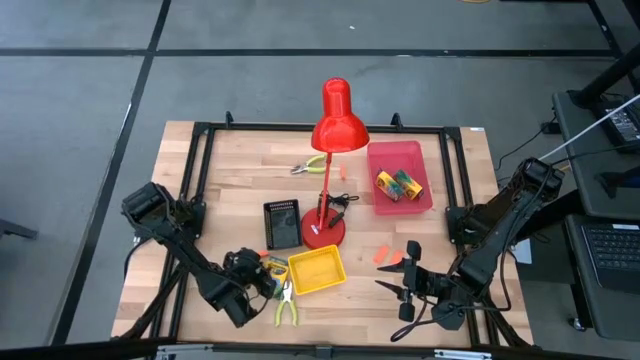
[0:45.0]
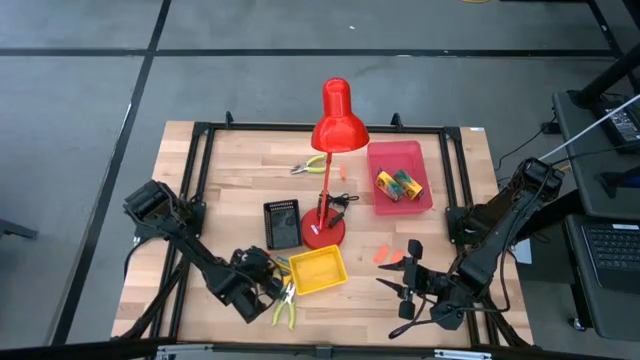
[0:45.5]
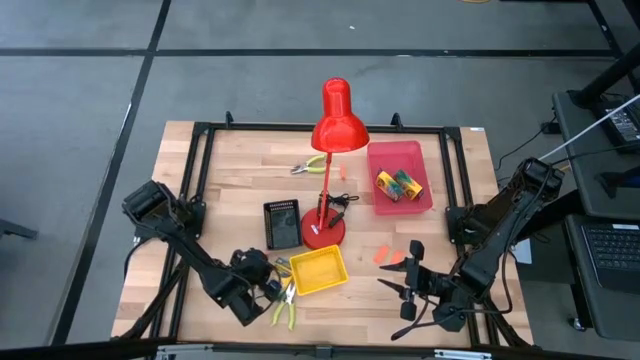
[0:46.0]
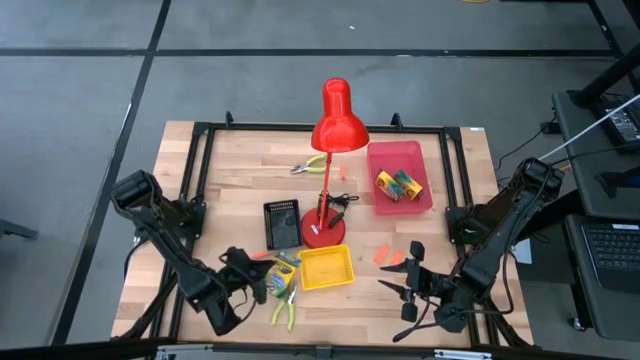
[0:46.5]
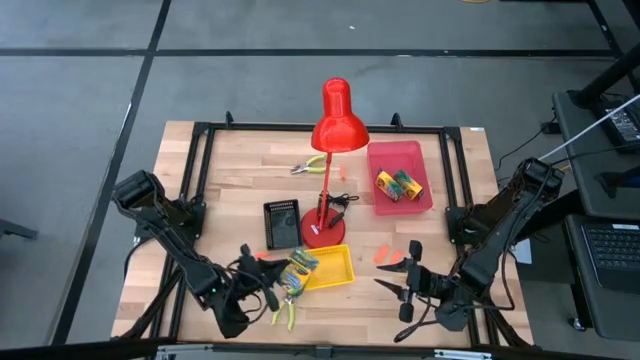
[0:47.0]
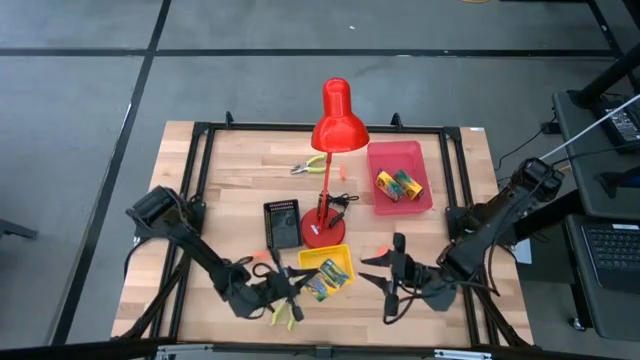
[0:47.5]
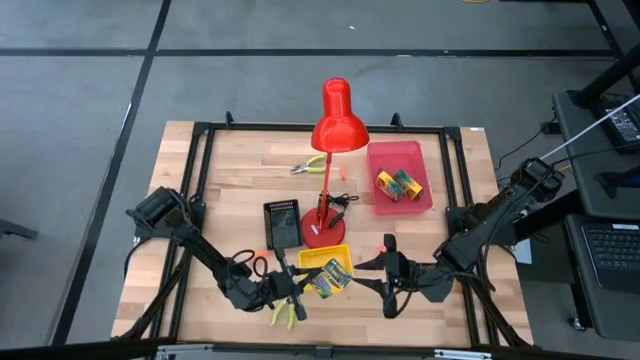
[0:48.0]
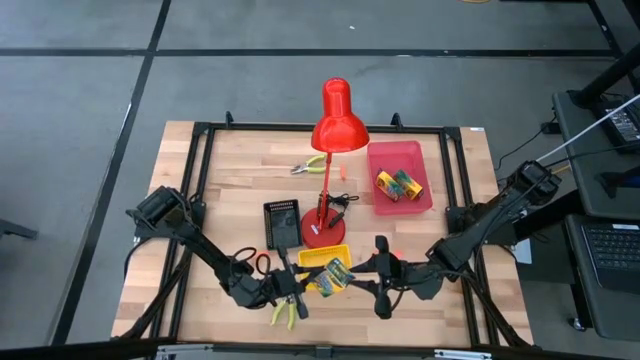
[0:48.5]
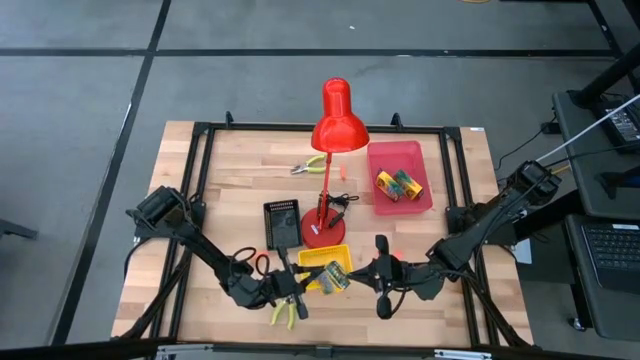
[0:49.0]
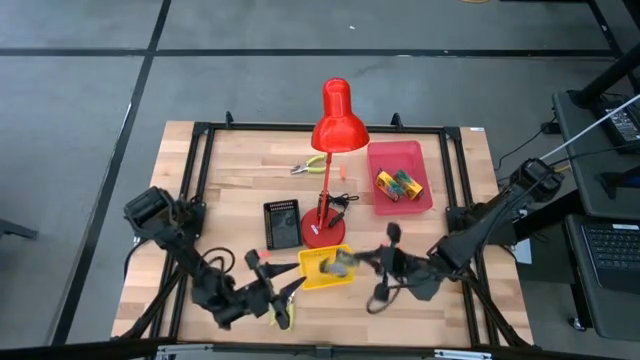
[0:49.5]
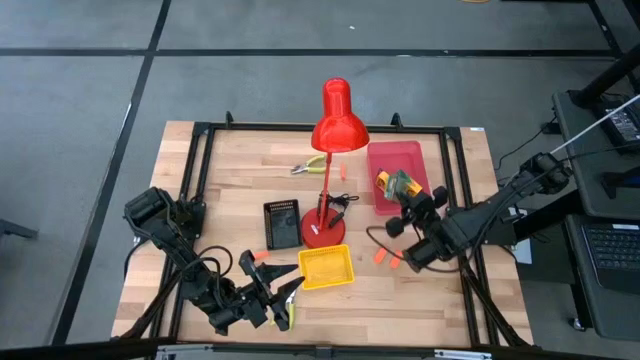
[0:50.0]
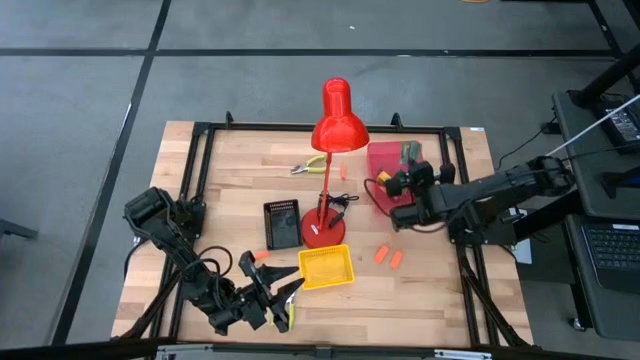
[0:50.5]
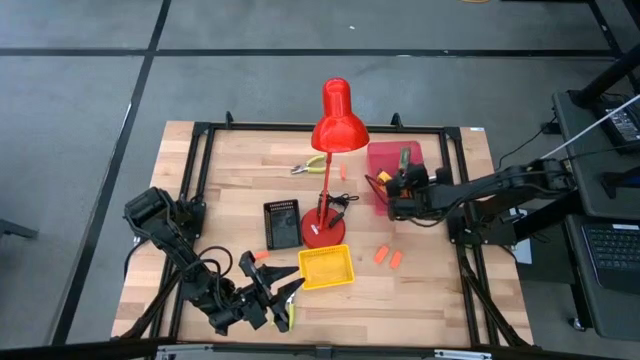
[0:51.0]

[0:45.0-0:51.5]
Task: Pick & Place School Supplies
Put the crayon box into the pink bin

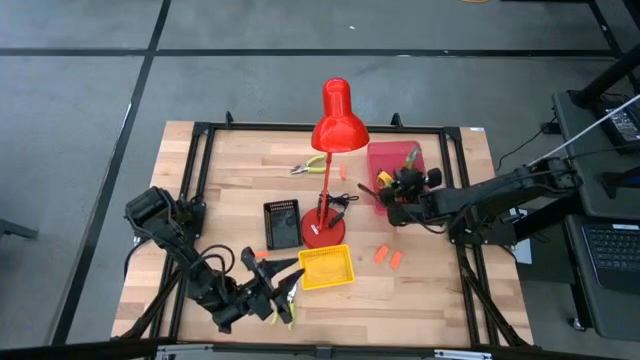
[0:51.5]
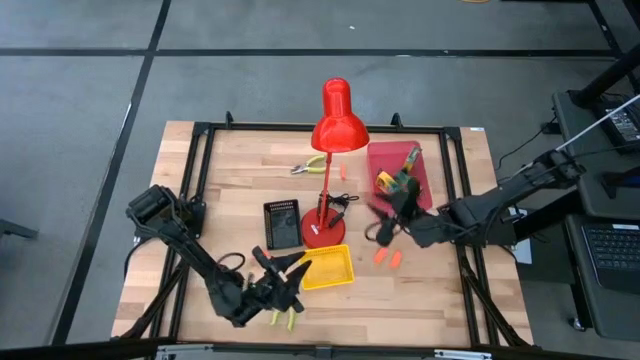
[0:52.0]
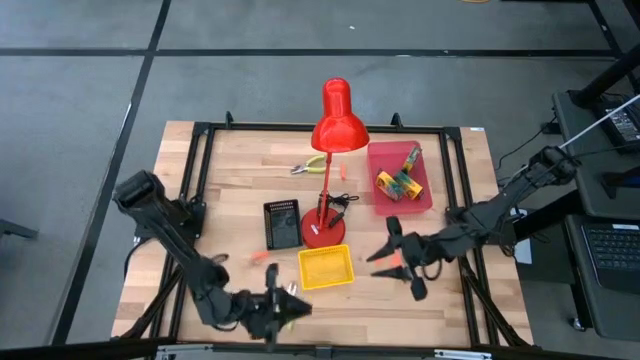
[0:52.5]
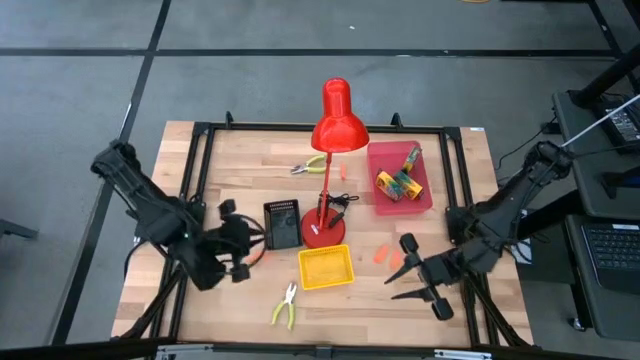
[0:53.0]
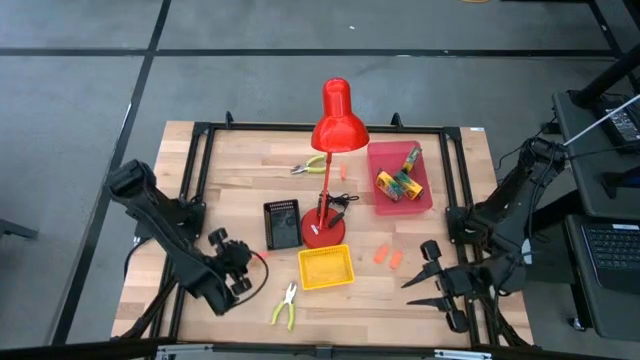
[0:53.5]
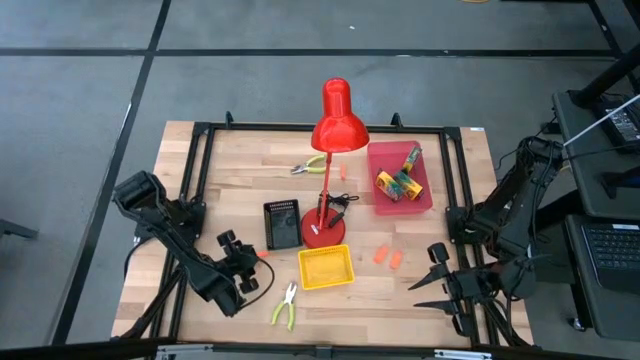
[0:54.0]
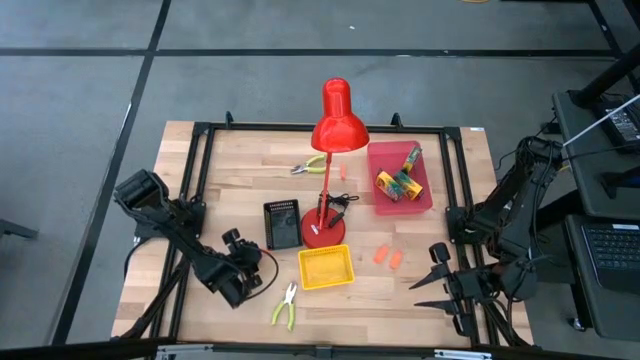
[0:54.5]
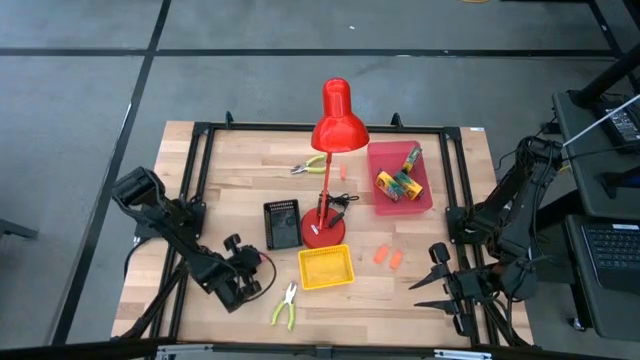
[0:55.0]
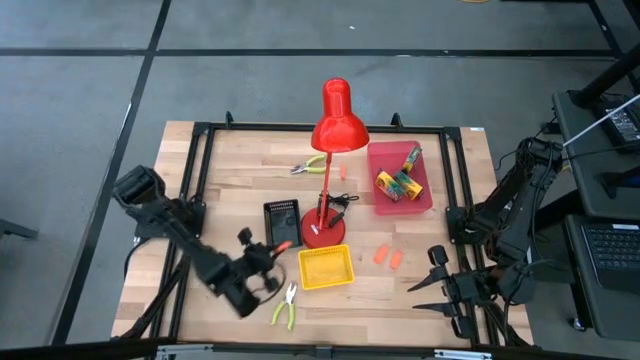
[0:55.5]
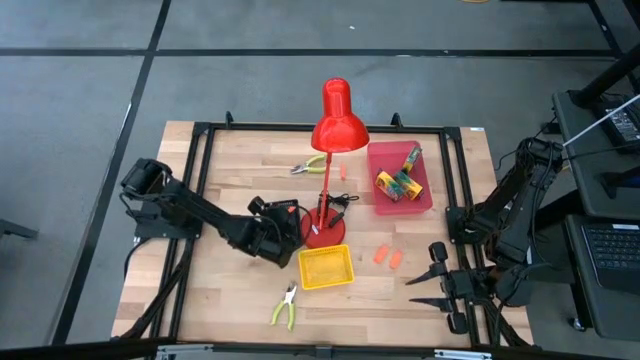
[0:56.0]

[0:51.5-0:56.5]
Put the orange eraser into the black bin

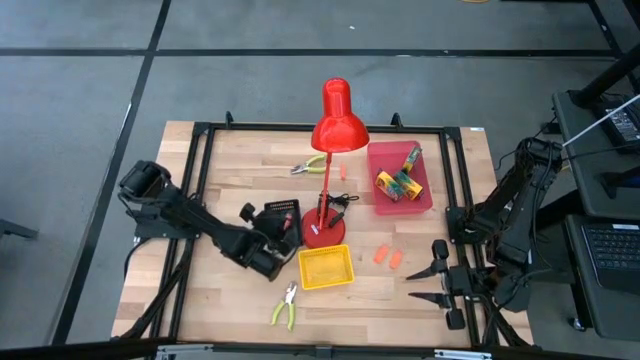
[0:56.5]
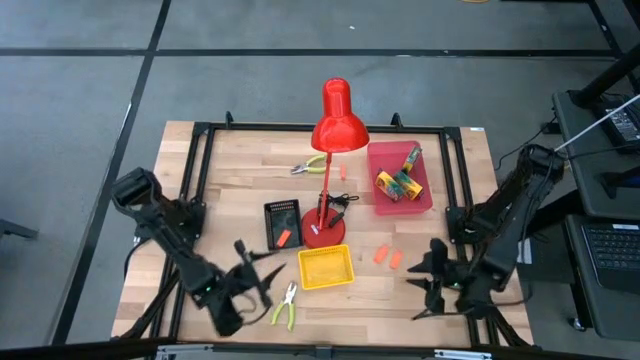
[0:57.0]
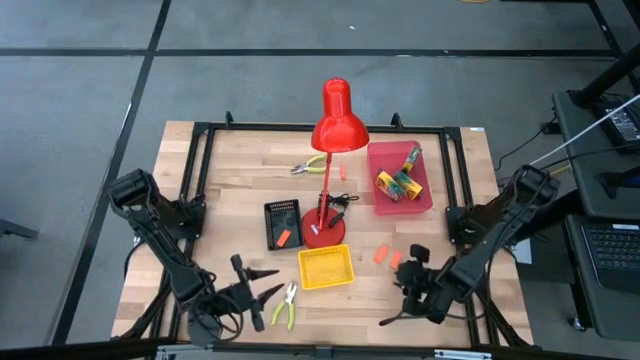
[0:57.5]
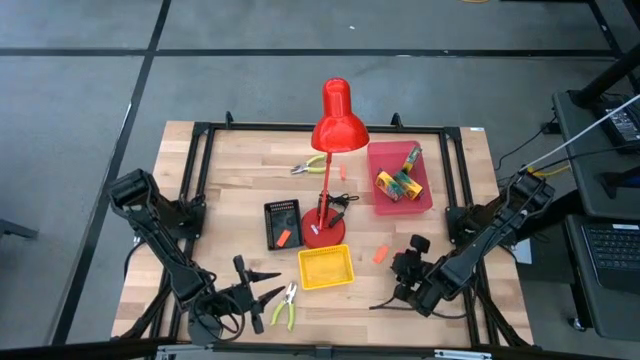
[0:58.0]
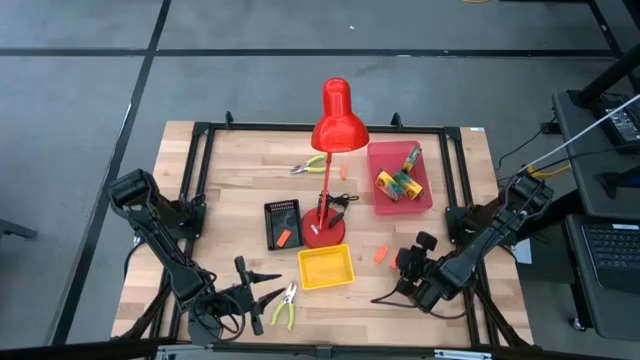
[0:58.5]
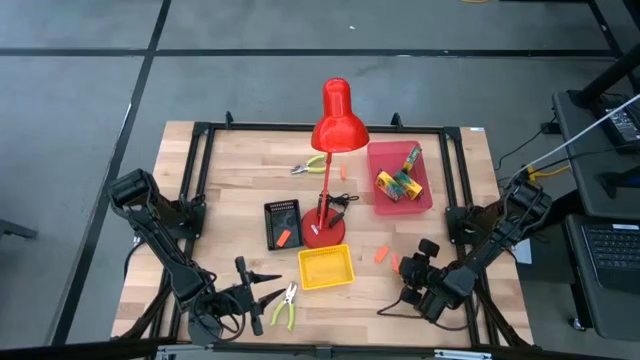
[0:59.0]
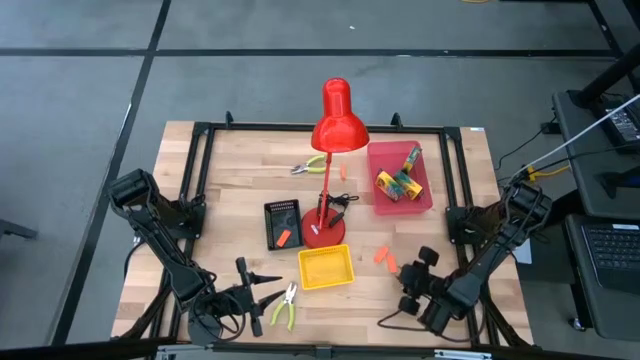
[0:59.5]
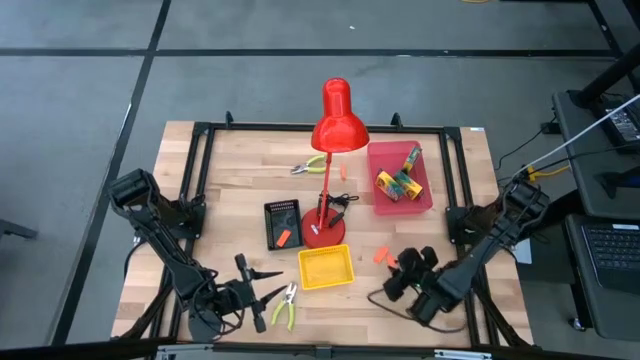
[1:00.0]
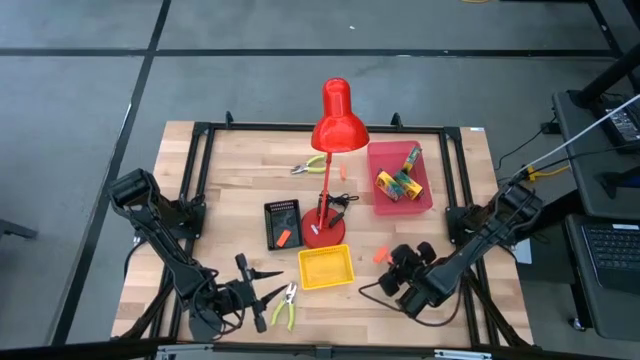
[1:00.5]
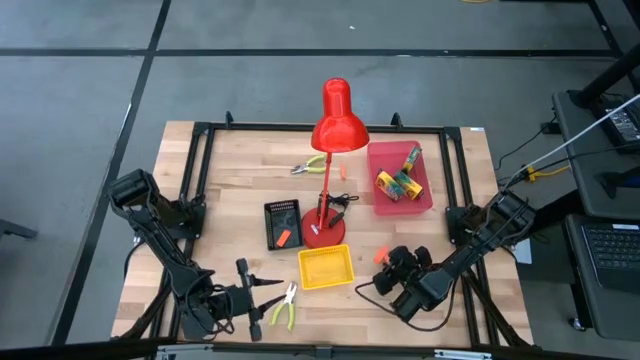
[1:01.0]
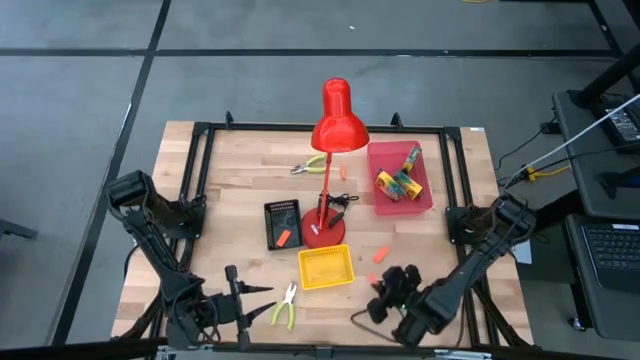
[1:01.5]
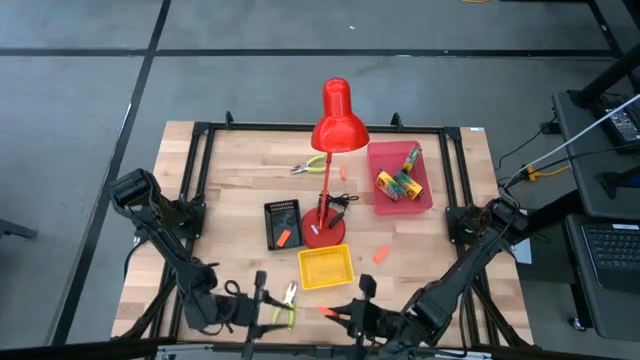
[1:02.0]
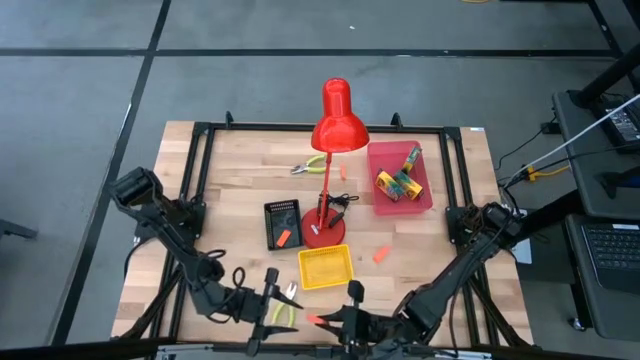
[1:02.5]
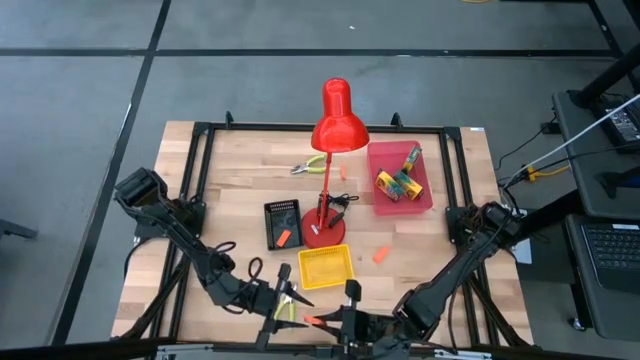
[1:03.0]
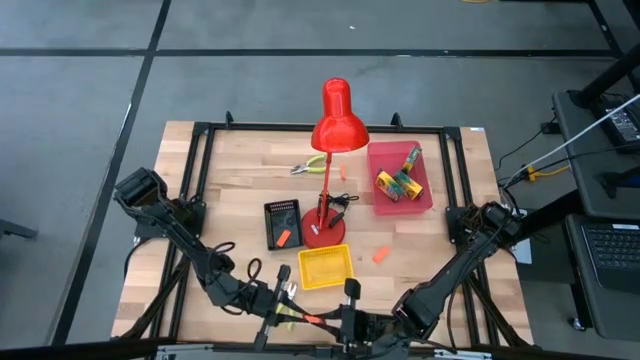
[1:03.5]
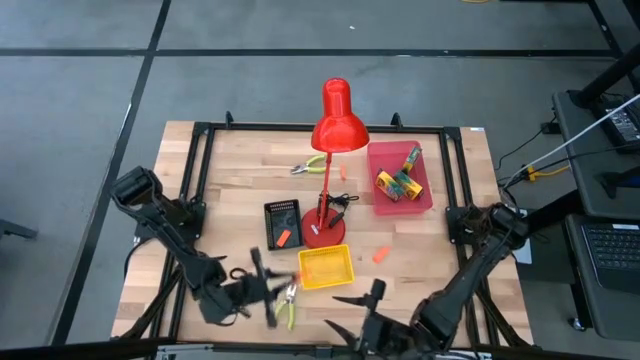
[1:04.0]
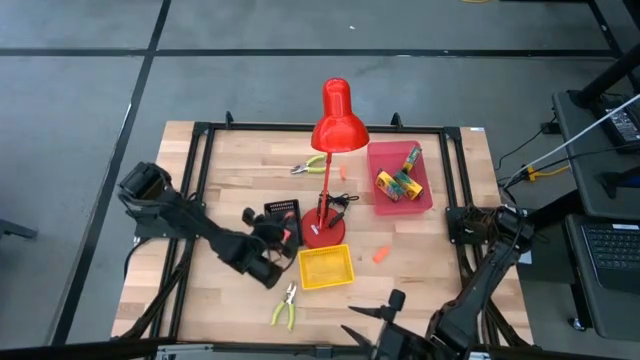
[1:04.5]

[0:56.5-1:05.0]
Put the orange eraser into the black bin

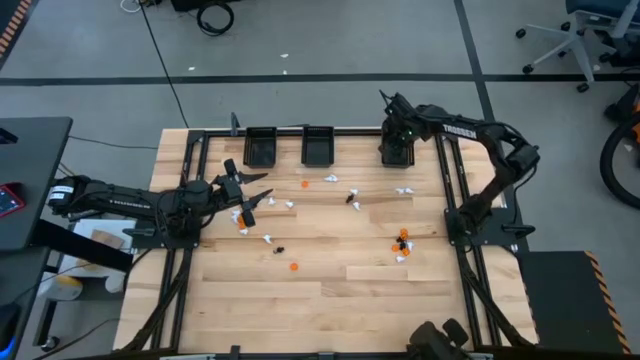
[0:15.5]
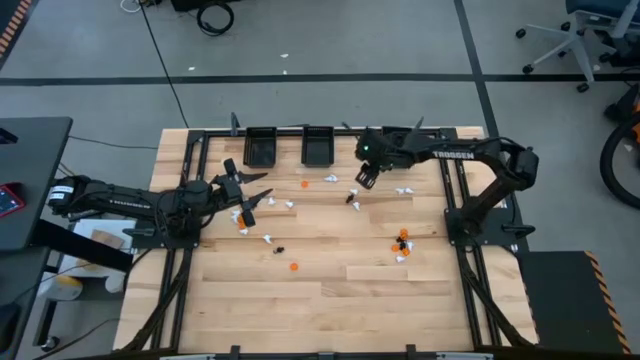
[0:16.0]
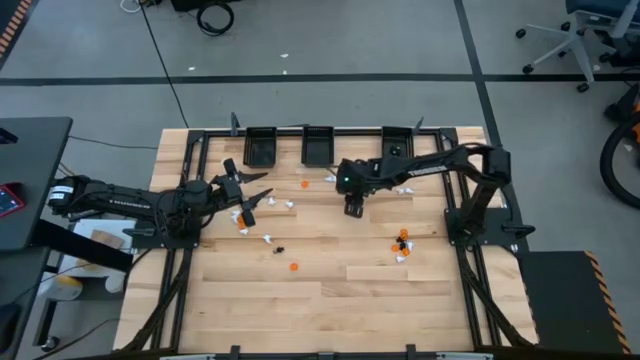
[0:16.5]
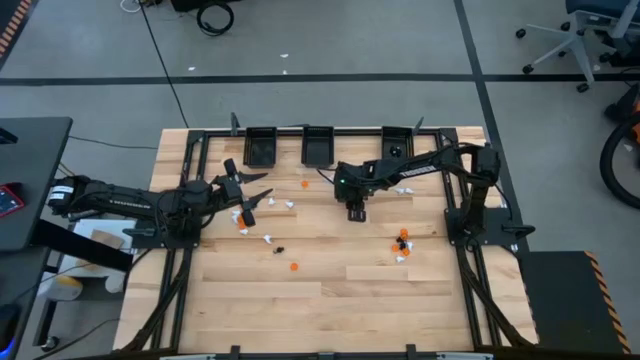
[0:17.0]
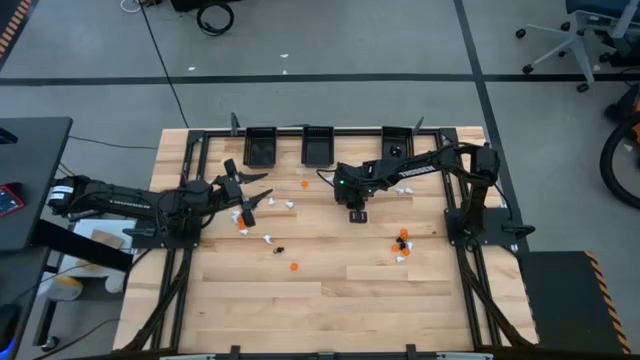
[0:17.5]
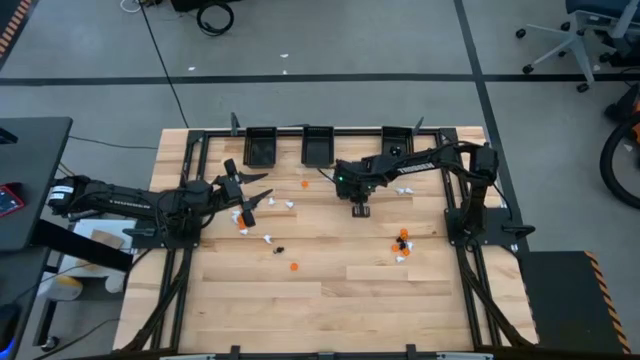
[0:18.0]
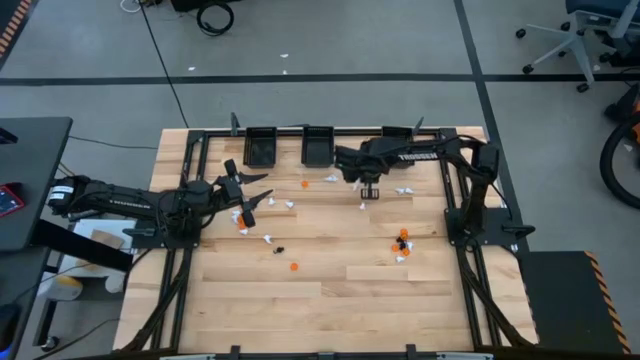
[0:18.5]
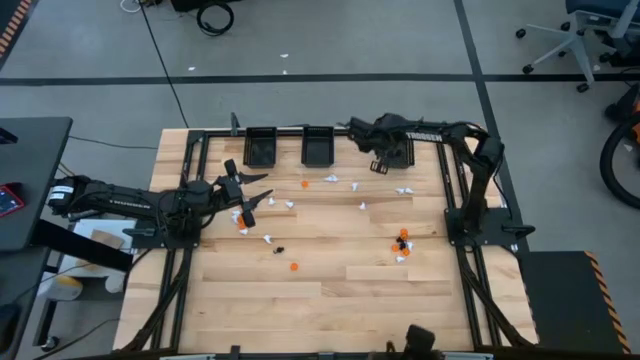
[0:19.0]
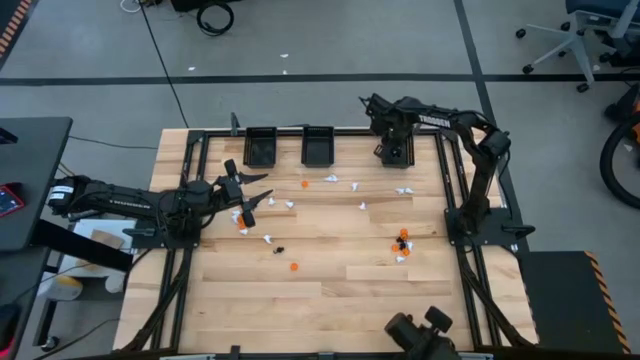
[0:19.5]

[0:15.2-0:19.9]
Task: Sort Halloween decoration
Put the black voodoo toy into the right black bin
